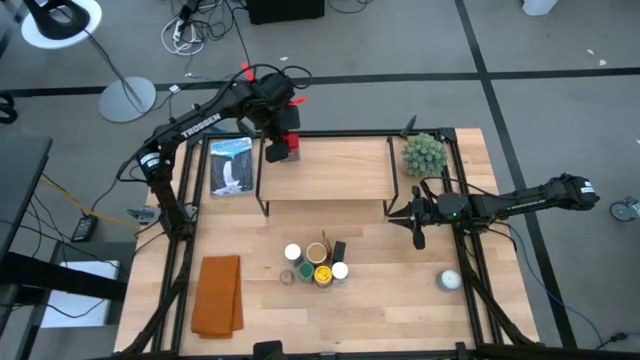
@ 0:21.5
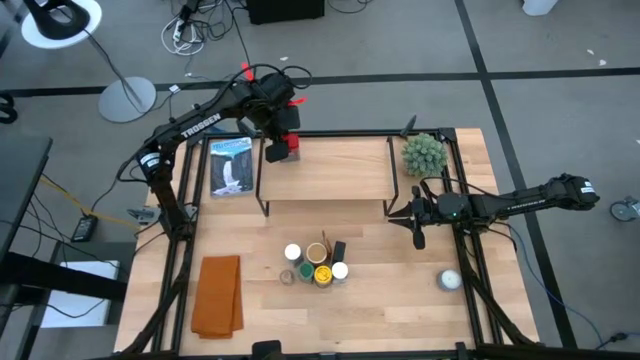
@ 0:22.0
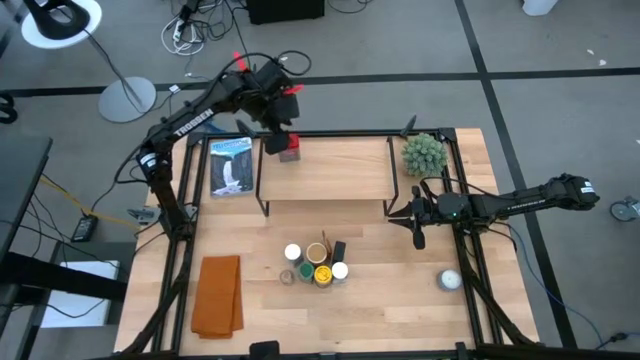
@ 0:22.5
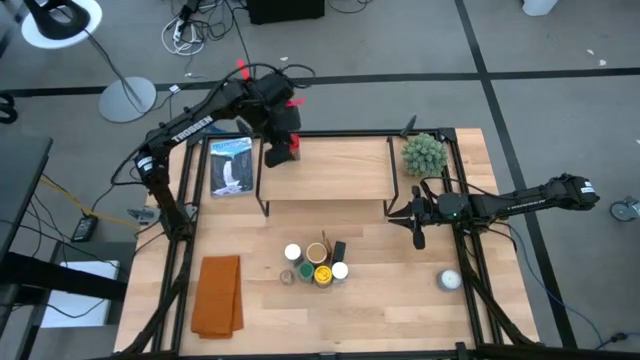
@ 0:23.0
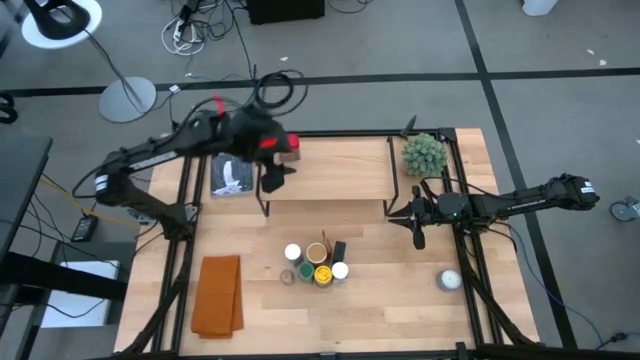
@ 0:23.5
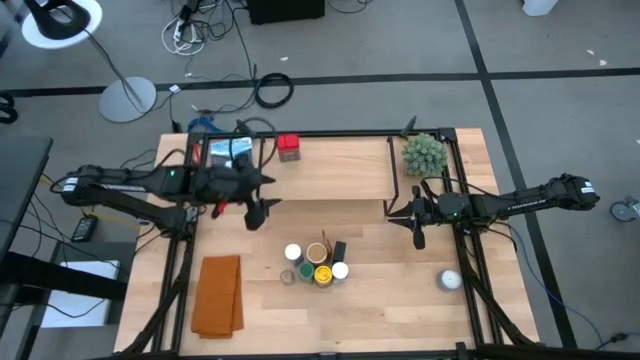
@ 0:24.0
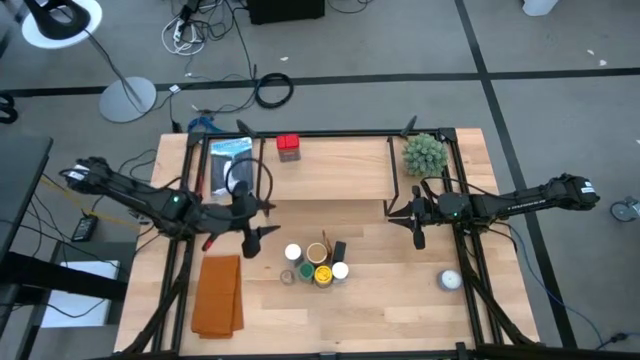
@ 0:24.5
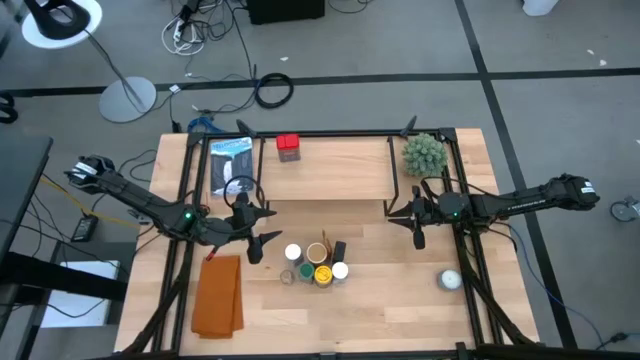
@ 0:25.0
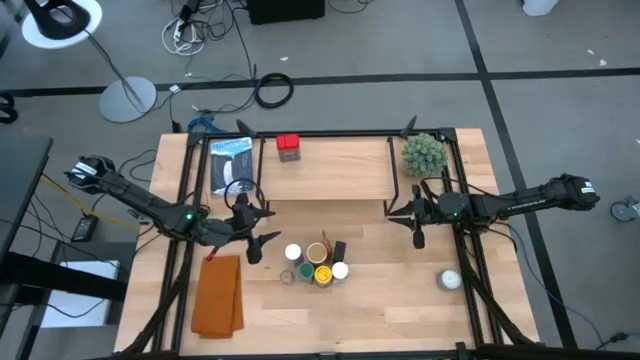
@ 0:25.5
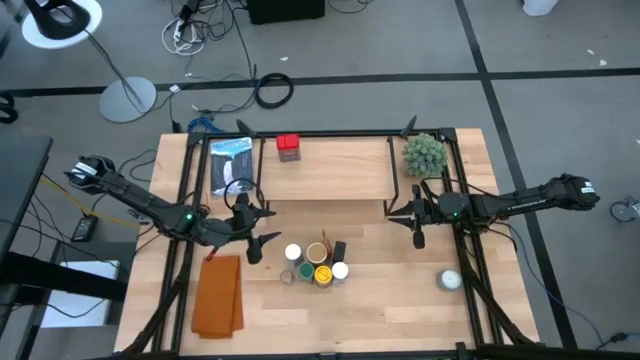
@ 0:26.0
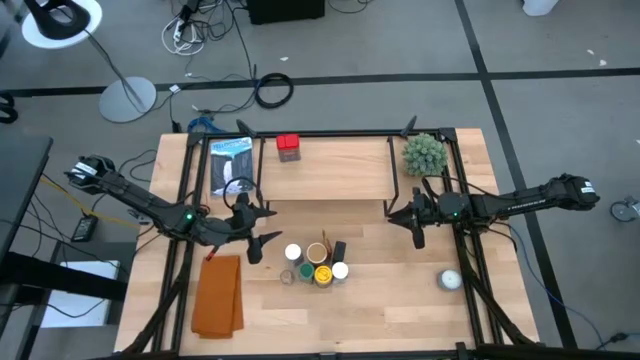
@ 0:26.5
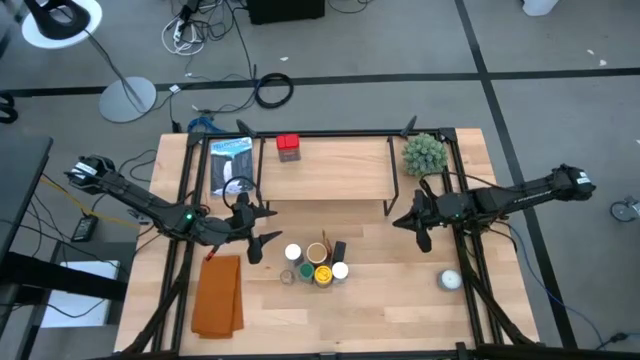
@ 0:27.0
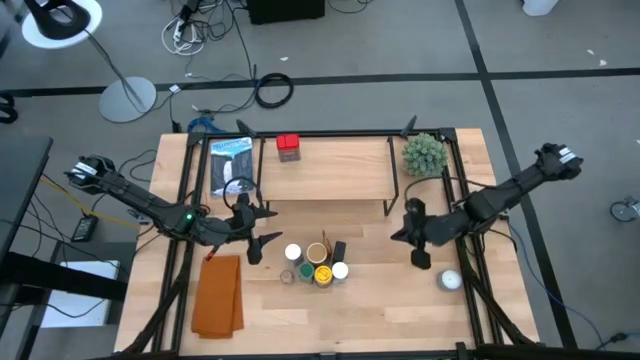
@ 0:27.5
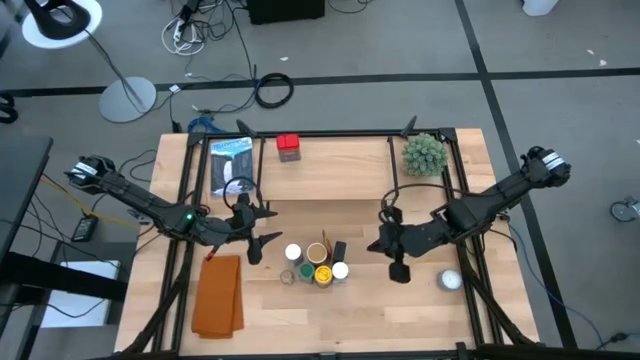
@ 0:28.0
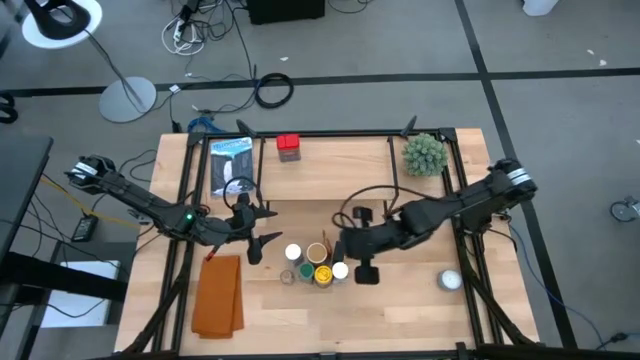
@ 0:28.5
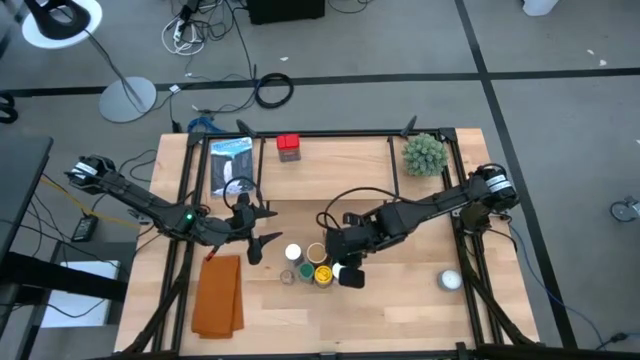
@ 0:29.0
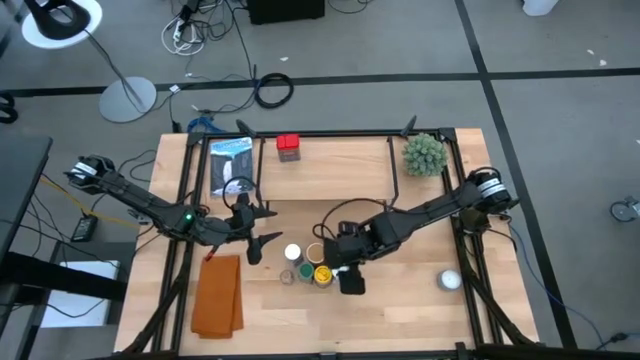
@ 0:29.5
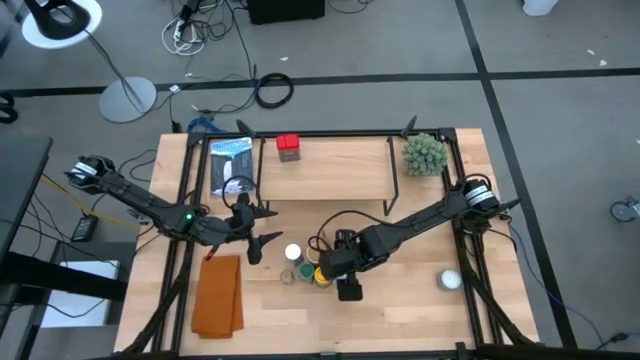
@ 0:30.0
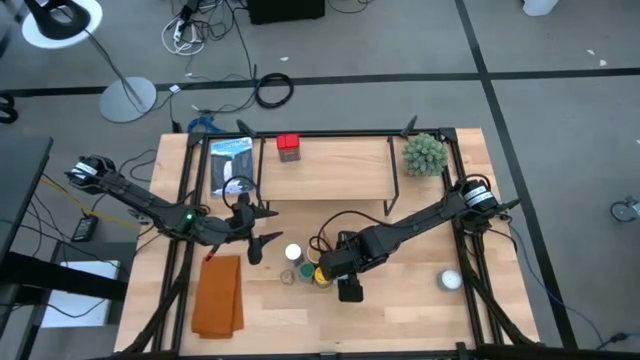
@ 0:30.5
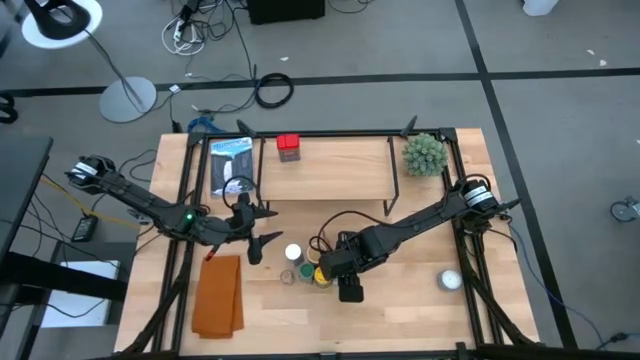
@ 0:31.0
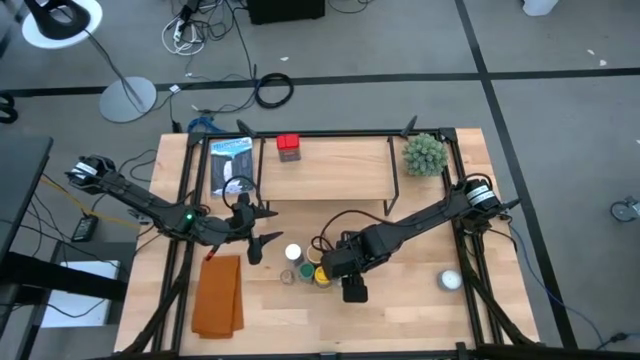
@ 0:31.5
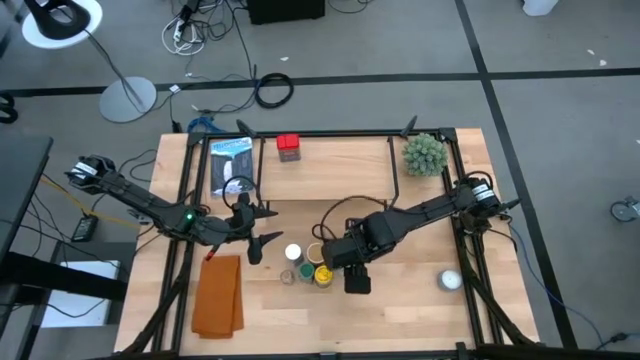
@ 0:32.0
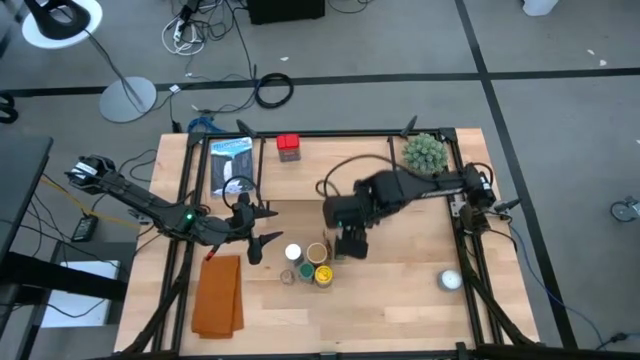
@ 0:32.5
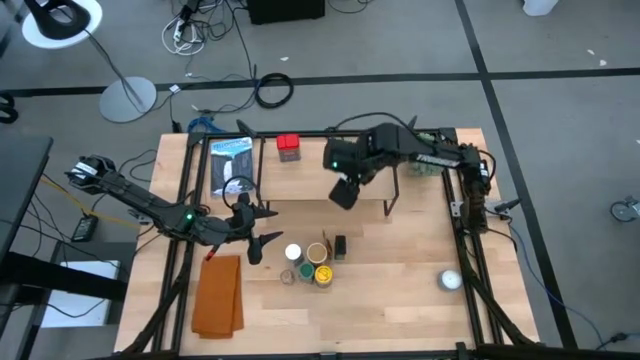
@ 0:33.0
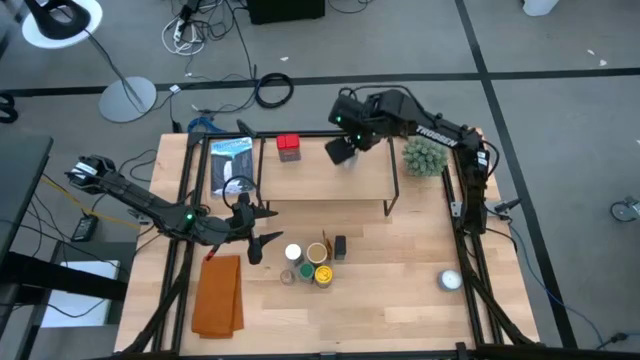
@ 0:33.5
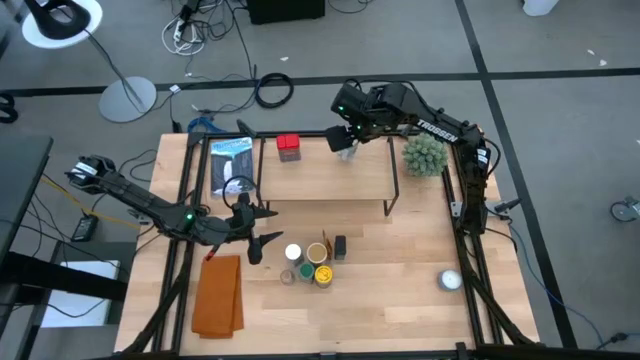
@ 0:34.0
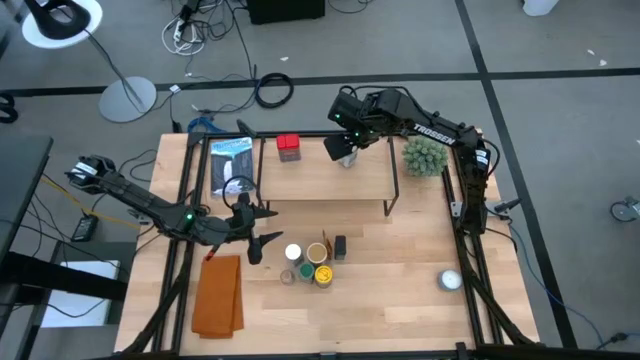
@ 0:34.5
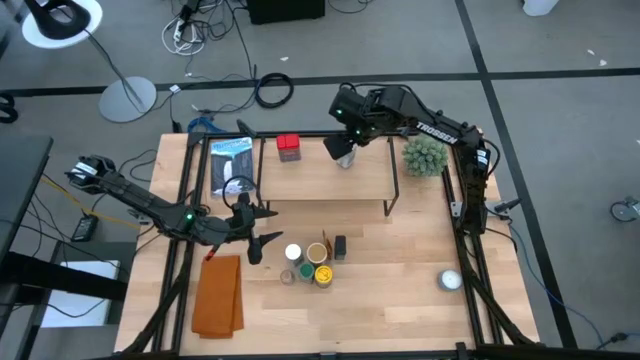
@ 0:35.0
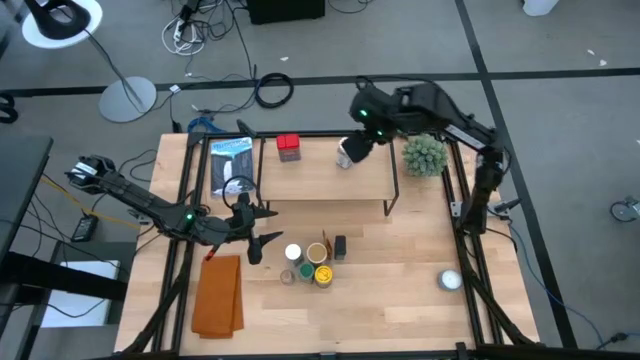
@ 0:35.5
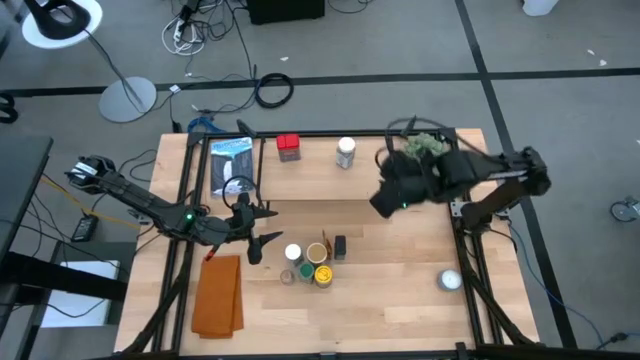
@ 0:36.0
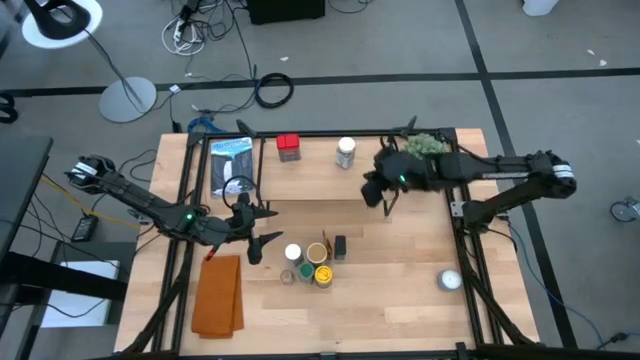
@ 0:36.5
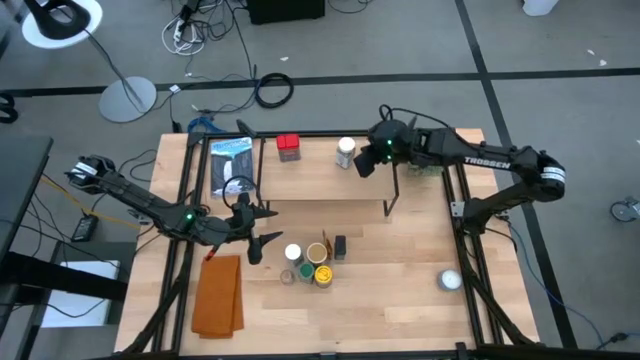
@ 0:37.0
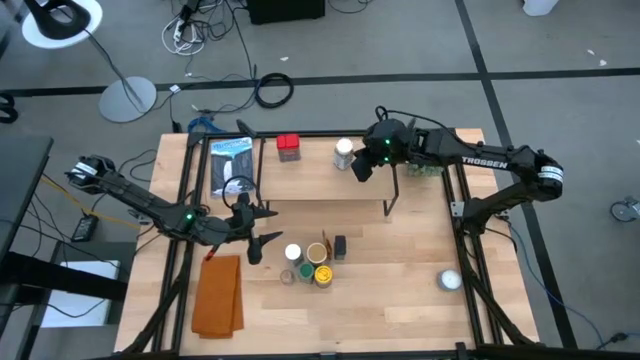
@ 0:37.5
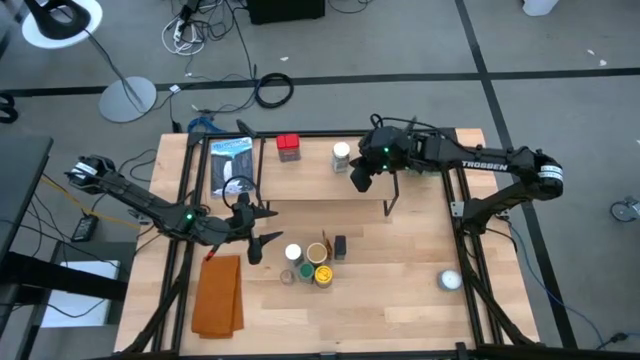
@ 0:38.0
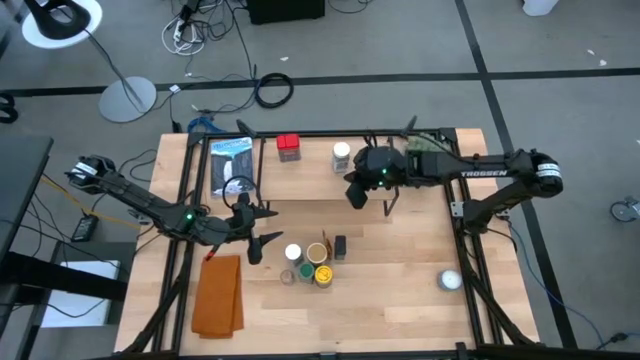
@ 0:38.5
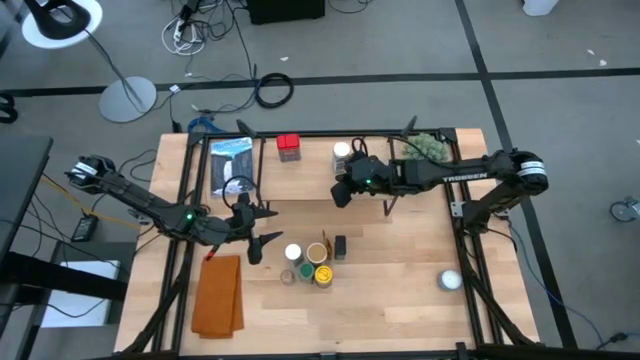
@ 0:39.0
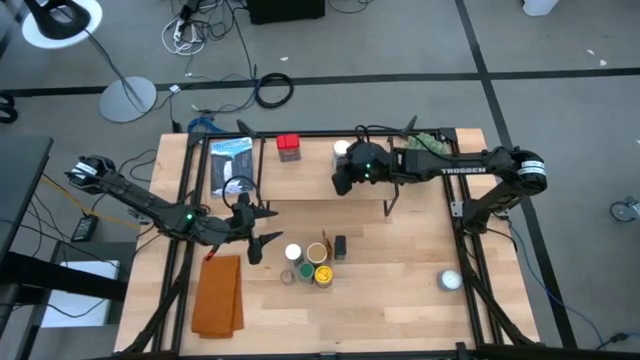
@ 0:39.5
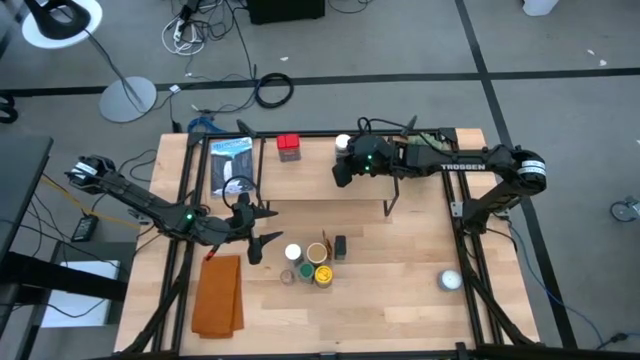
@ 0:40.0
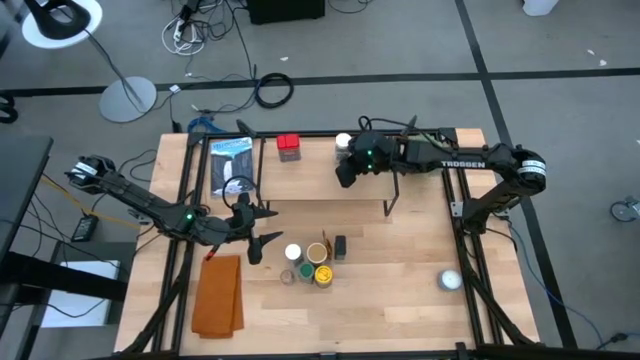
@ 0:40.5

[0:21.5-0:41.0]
Task: Shelf spices
Put the right white seasoning bottle on the shelf

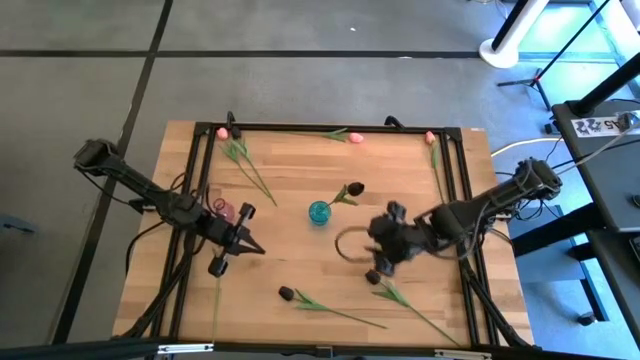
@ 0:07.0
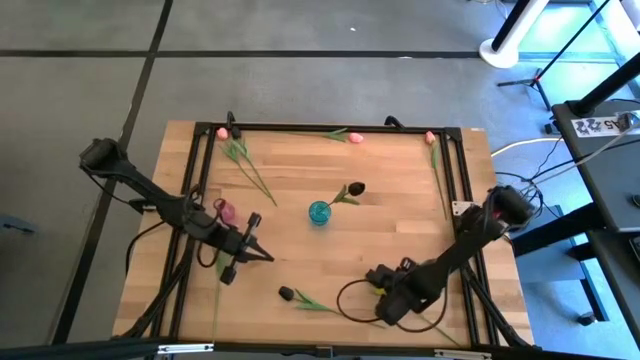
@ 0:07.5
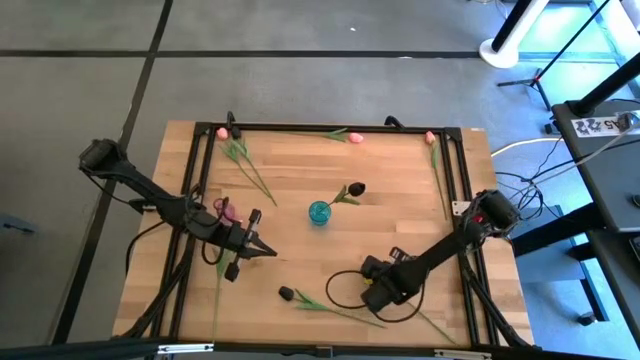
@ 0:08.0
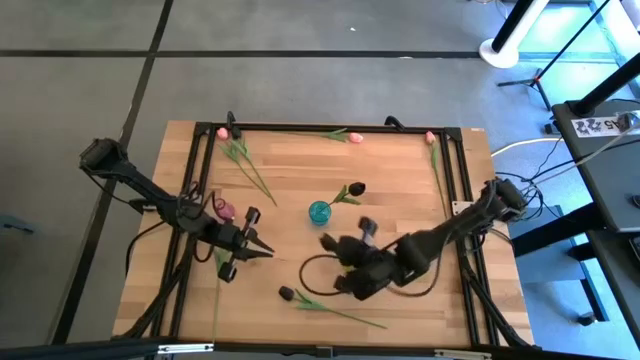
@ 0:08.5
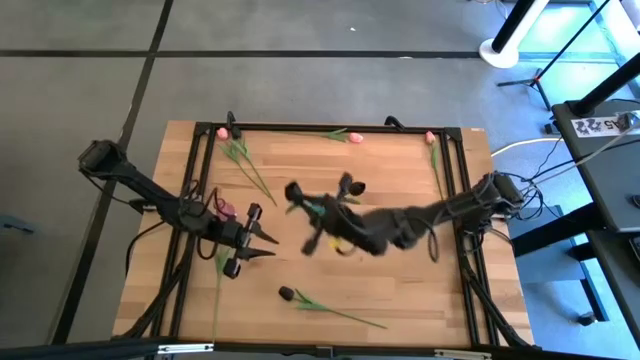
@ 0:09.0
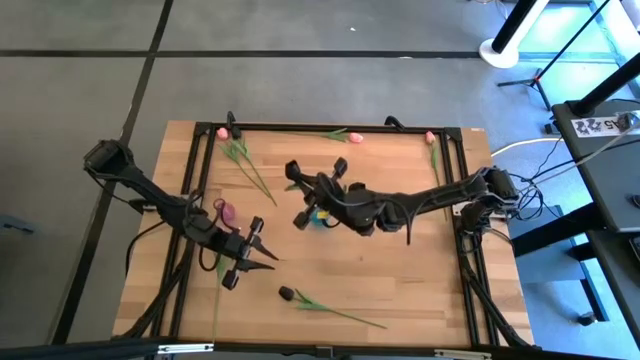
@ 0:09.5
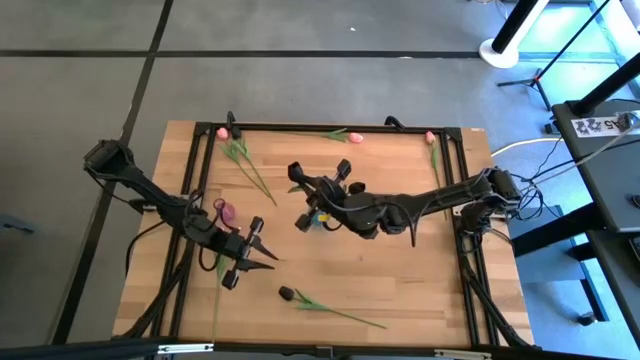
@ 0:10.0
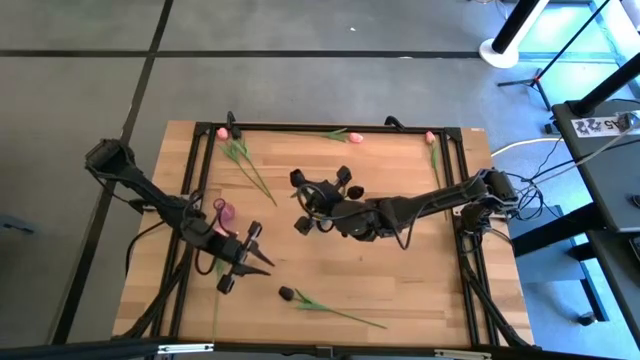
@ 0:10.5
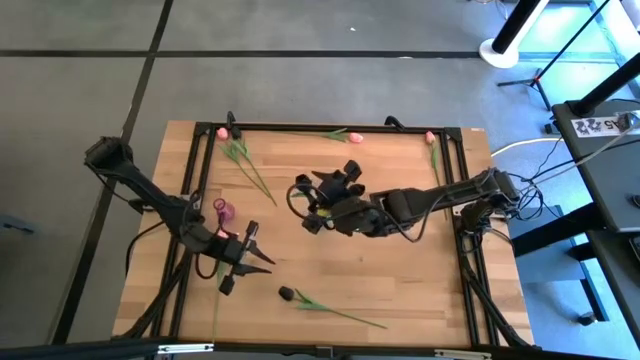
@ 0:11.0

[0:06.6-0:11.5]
Task: Sort flowers into vase by color
Put the bottom right black tulip into the blue vase
